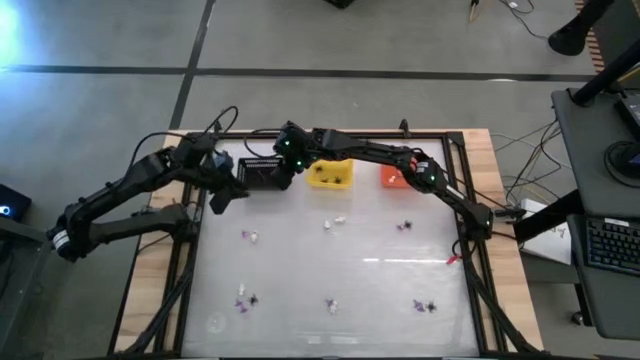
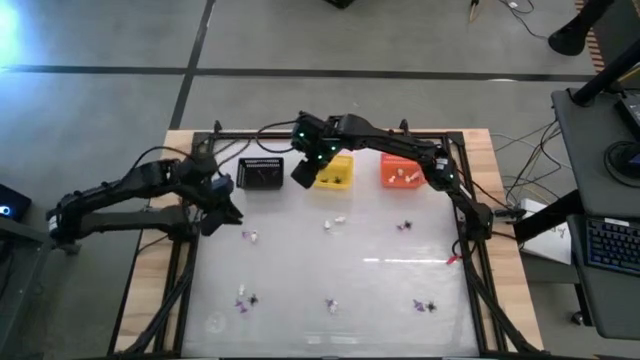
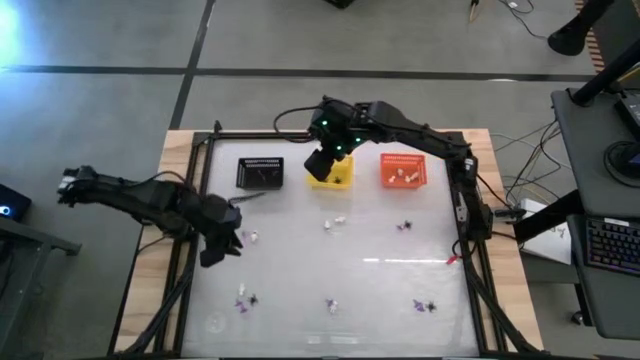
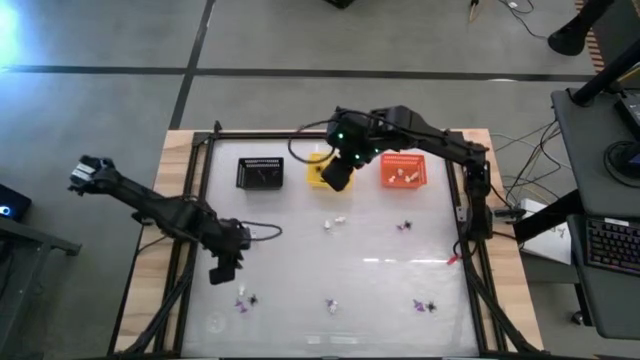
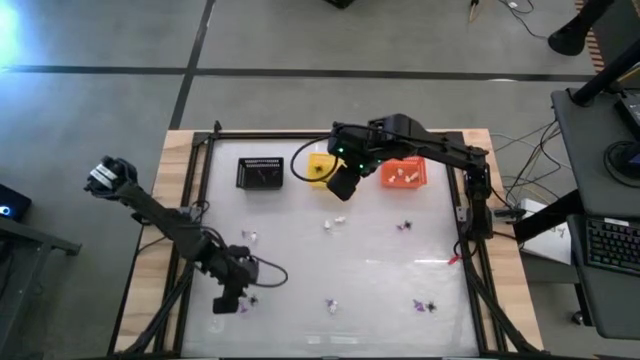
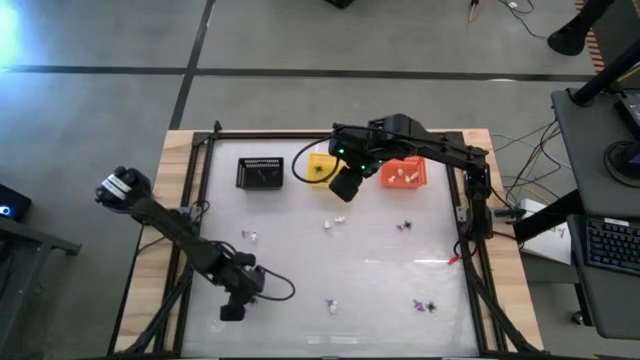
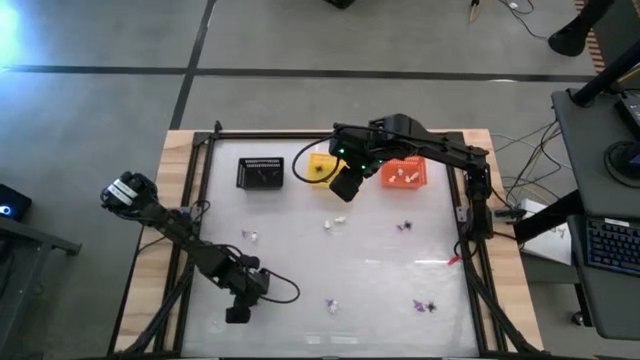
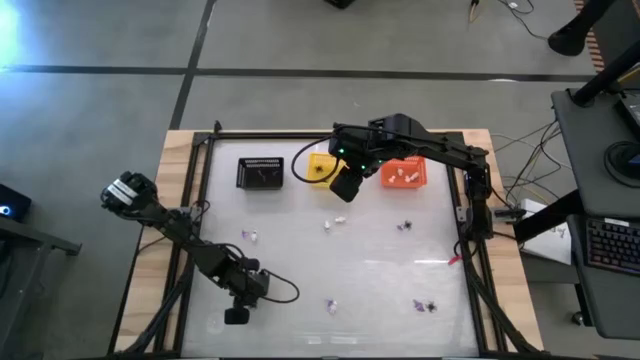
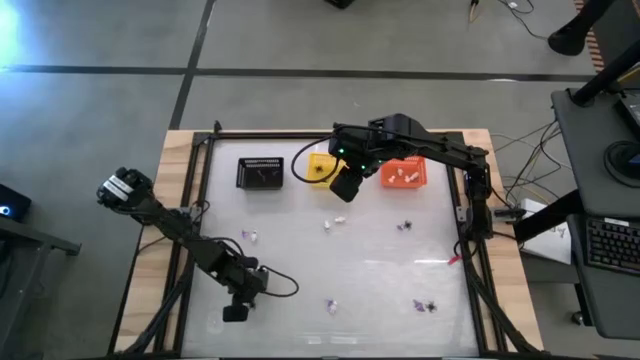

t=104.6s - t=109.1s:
Task: Sort Halloween decoration
Put the black spider toy into the yellow bin

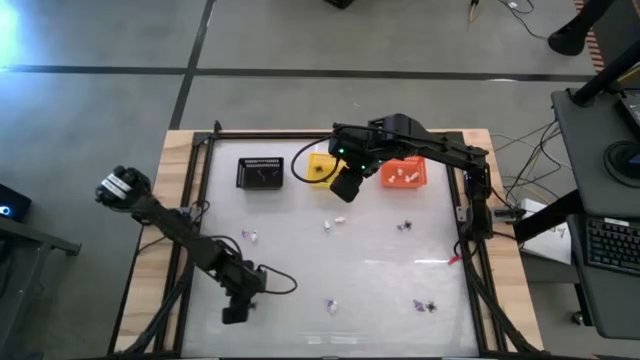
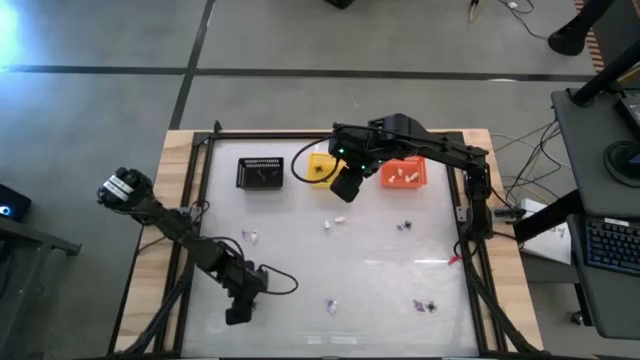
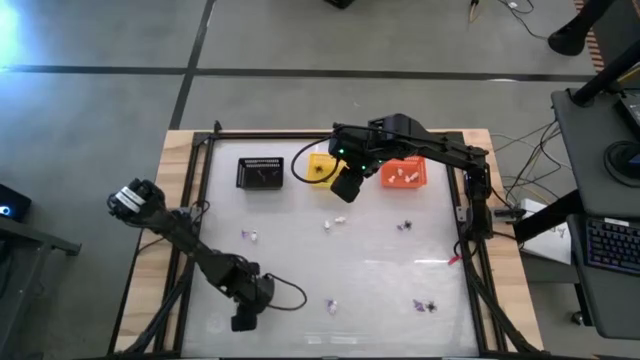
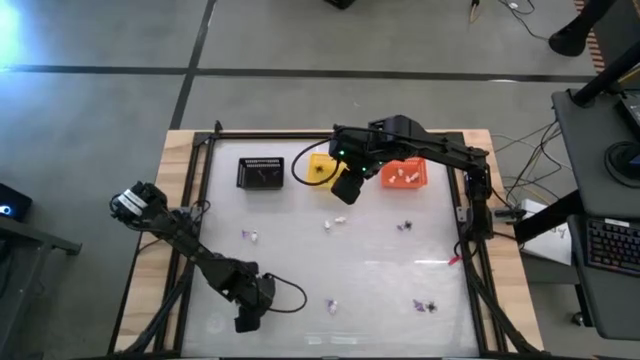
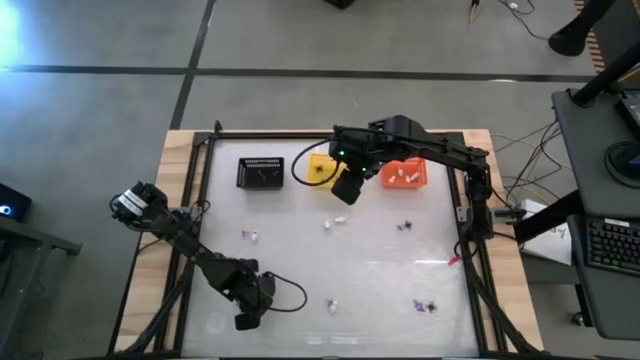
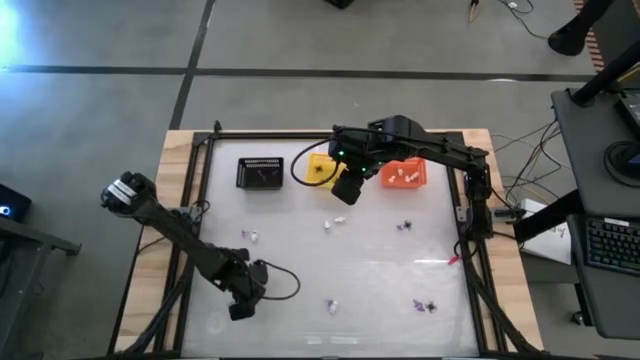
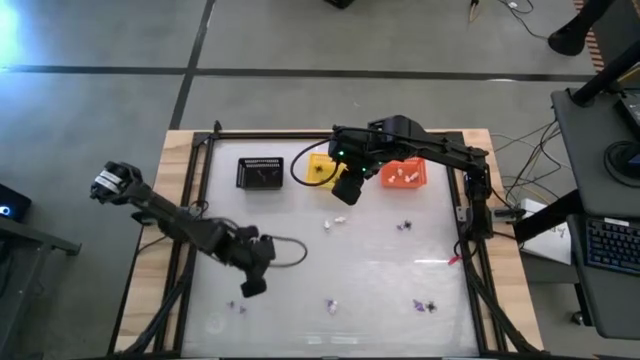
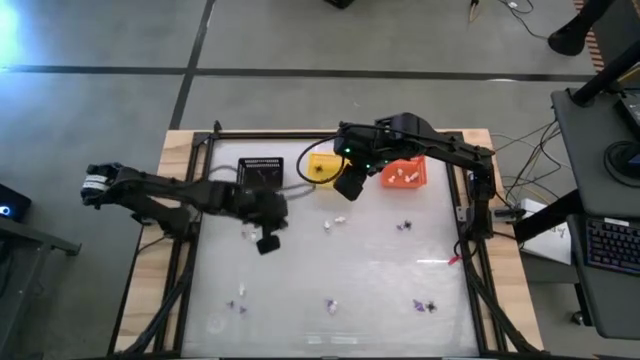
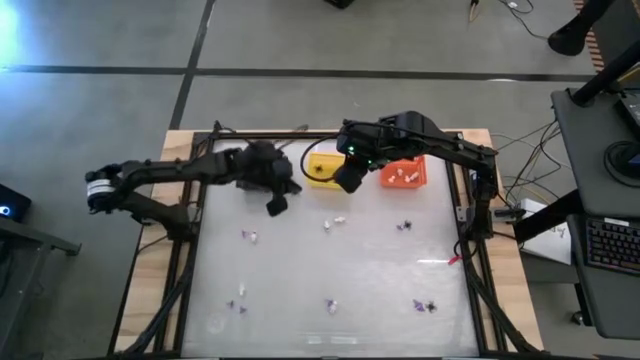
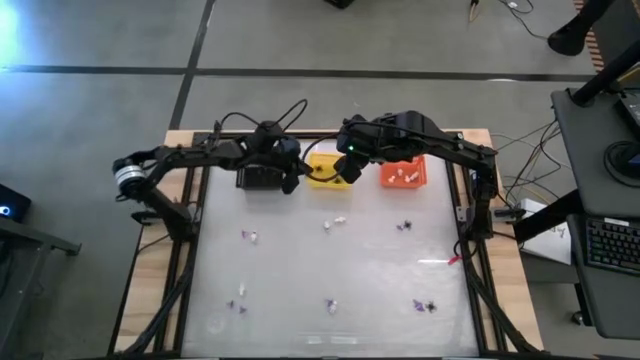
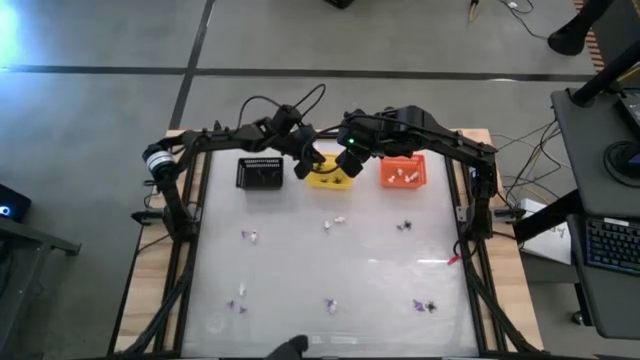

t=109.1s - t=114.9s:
Put the black spider toy into the yellow bin

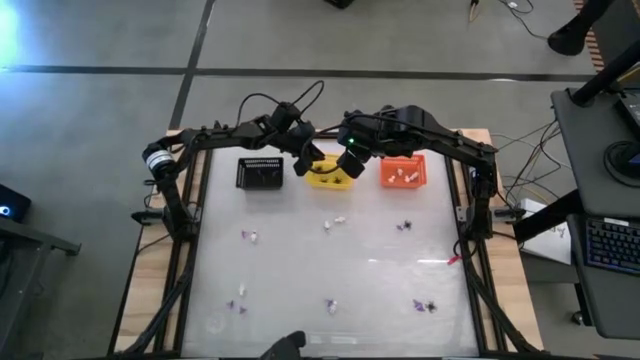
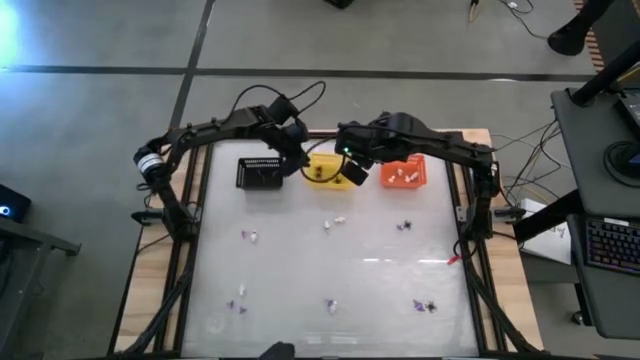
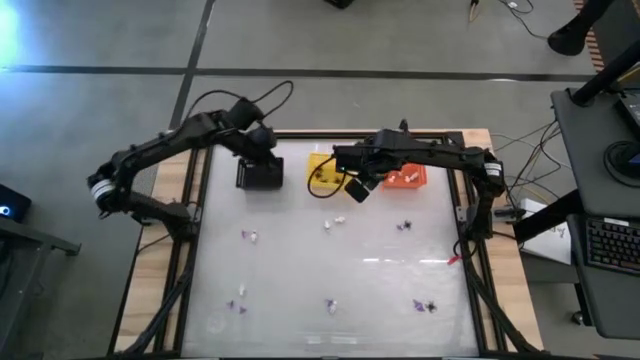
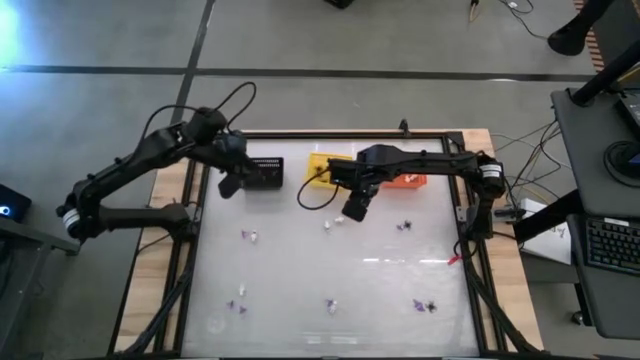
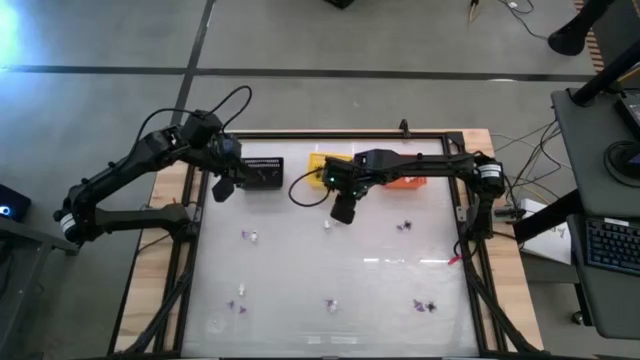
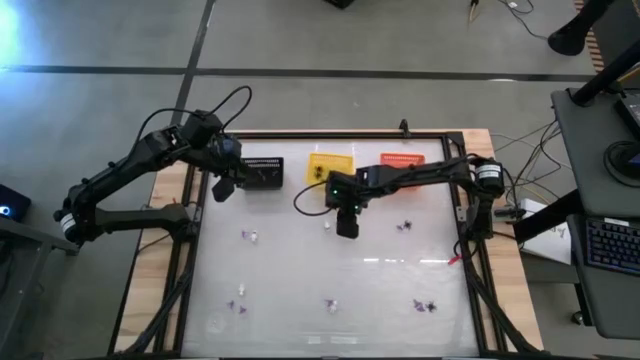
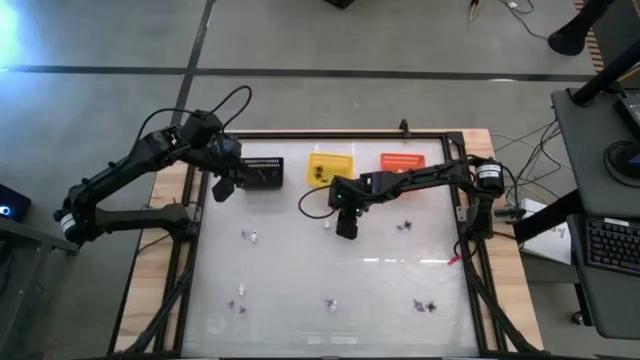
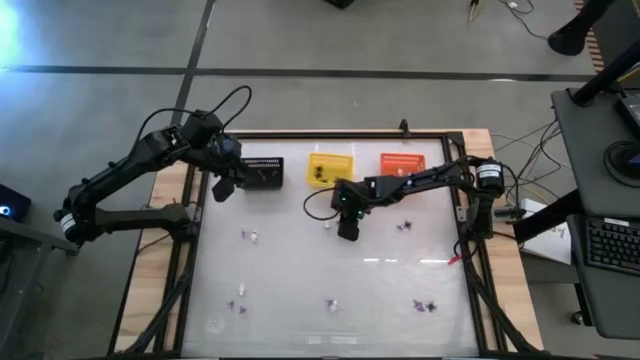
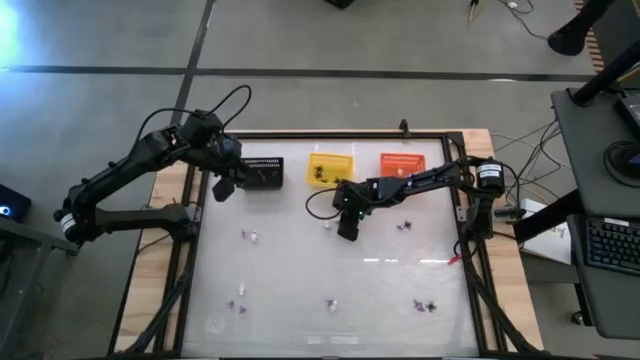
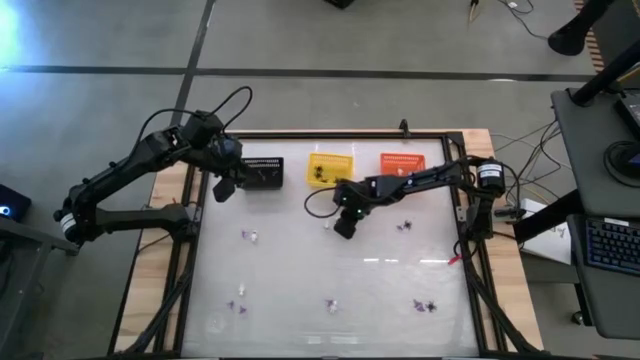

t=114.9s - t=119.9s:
Put the white skeleton toy into the orange bin

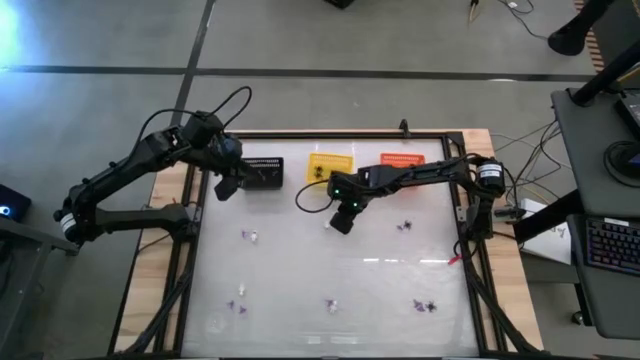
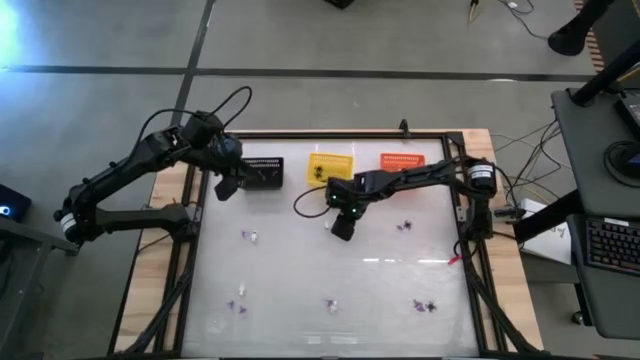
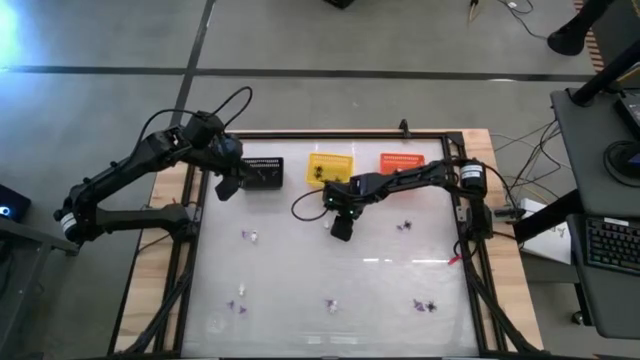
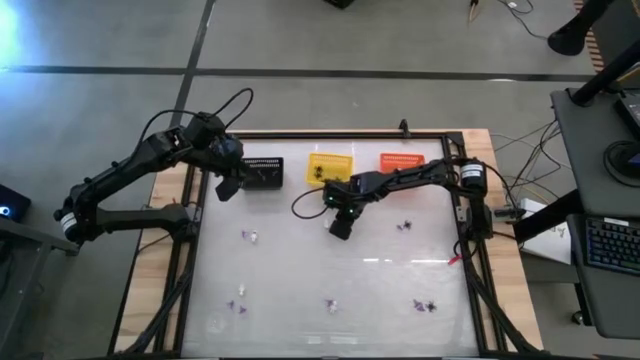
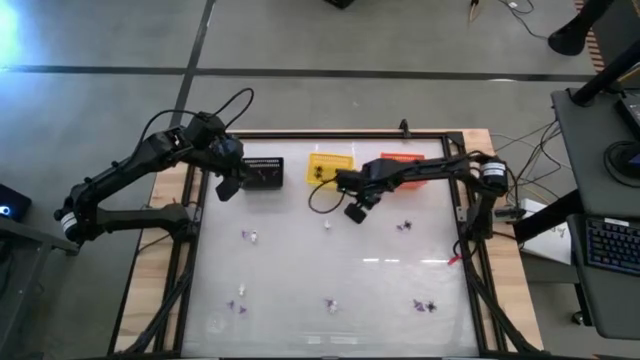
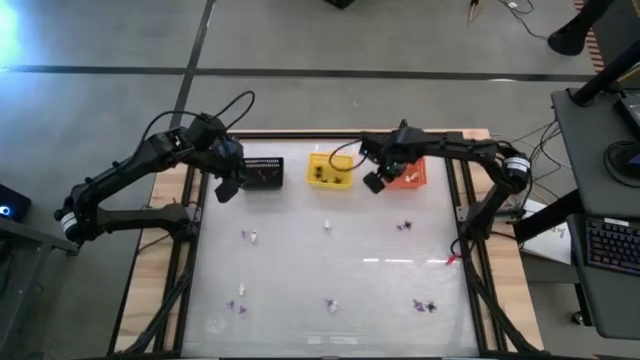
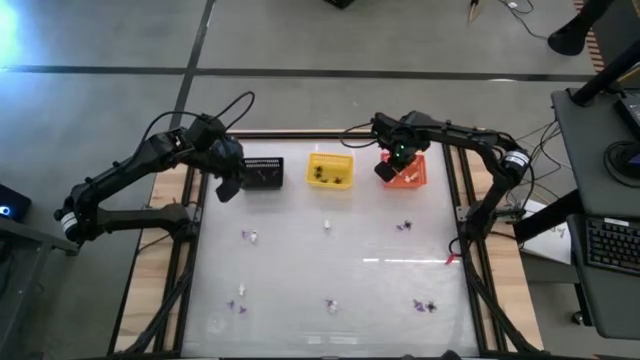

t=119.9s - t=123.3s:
Put the white skeleton toy into the orange bin

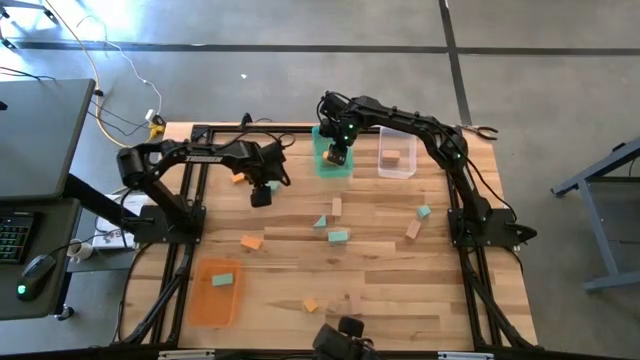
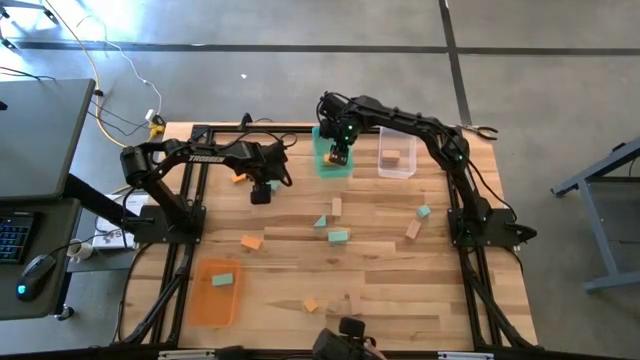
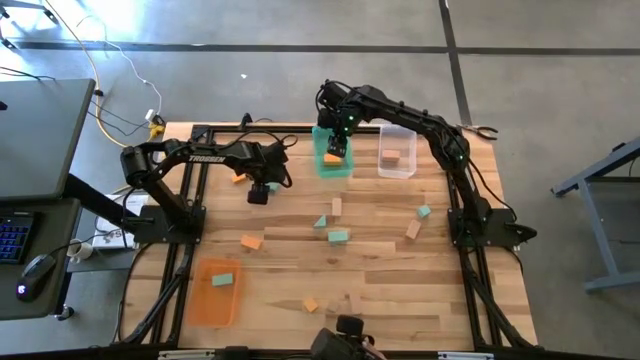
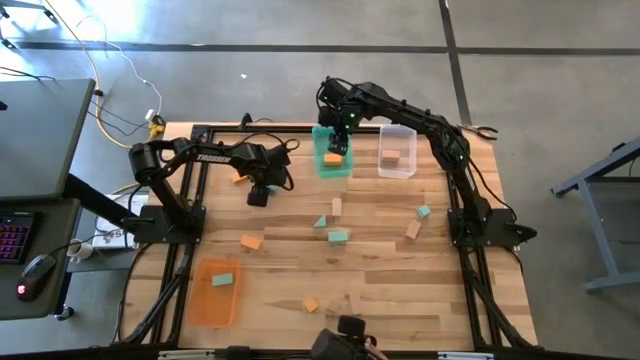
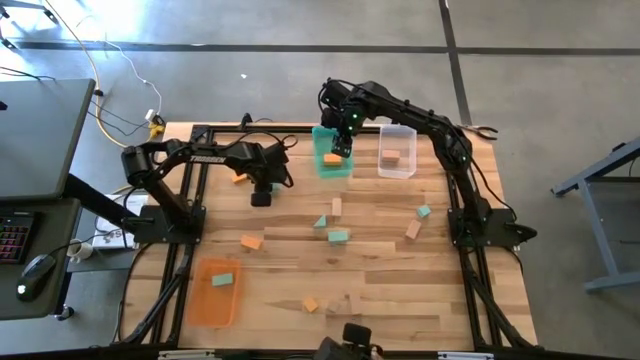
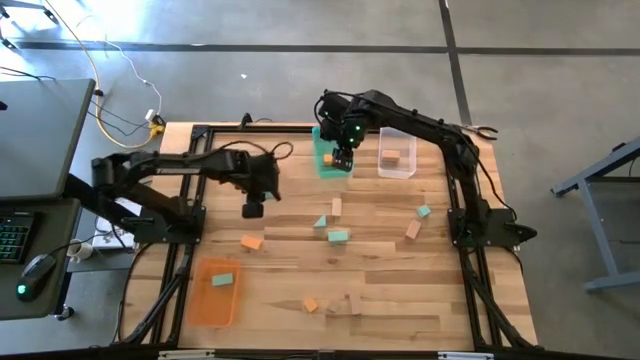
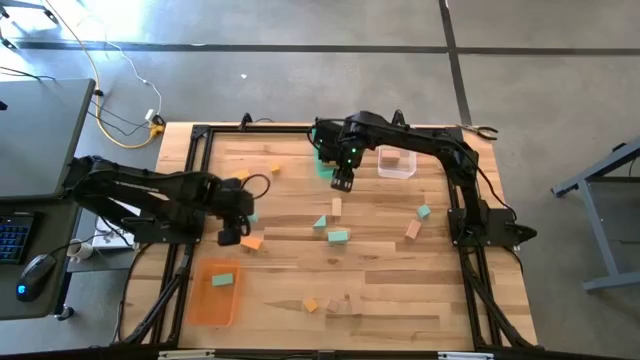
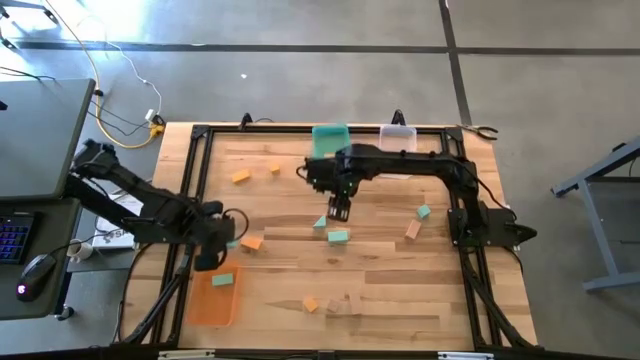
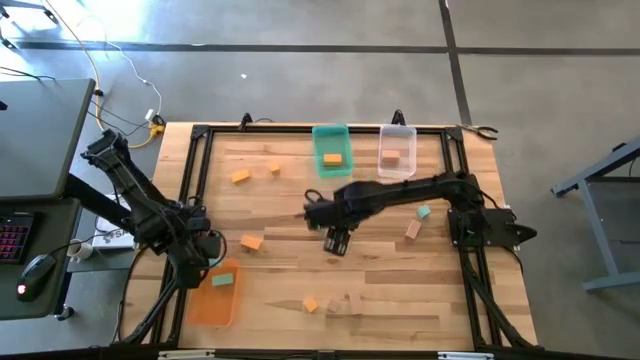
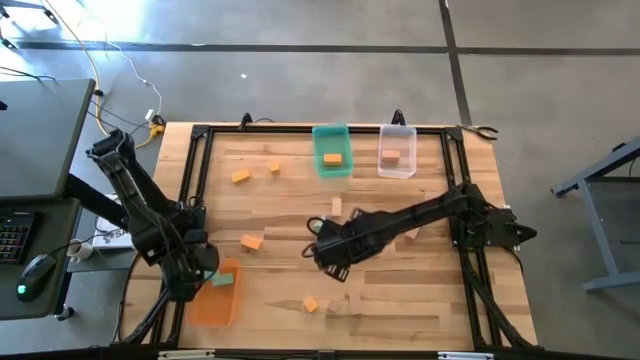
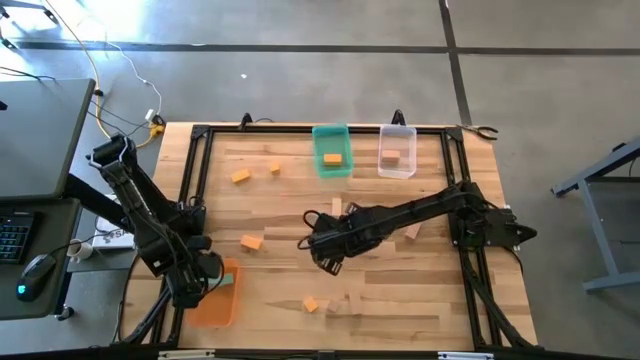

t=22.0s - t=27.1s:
Task: Sort & place blocks by color
Put the light blue block into the orange bin
